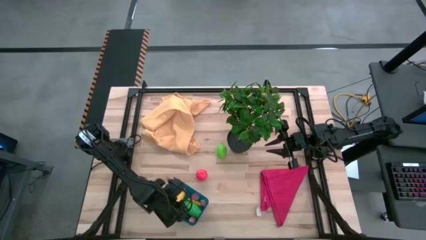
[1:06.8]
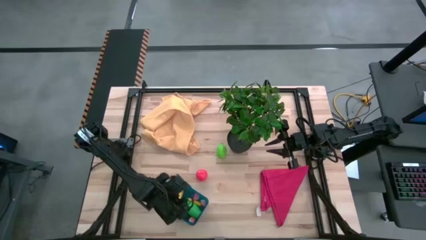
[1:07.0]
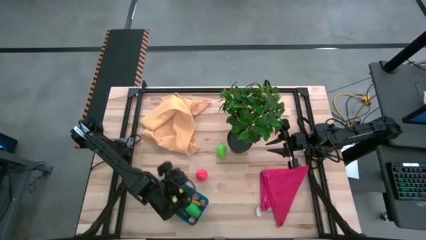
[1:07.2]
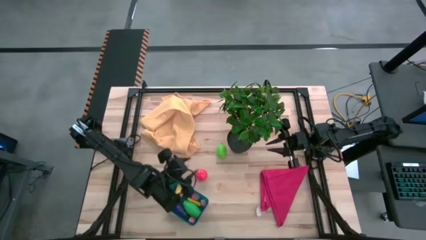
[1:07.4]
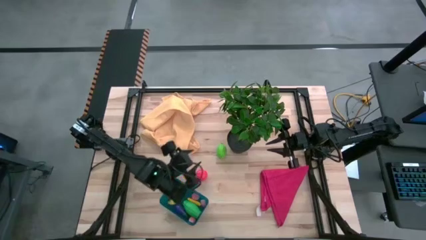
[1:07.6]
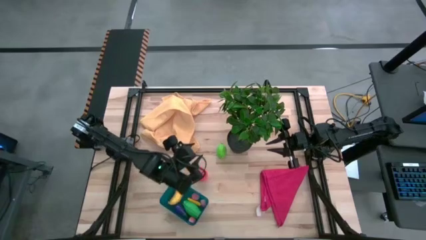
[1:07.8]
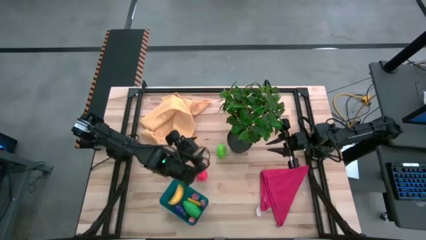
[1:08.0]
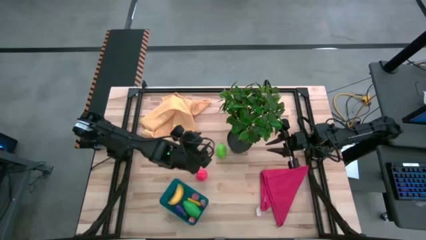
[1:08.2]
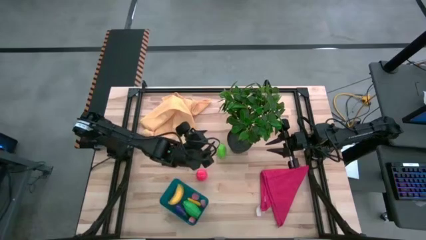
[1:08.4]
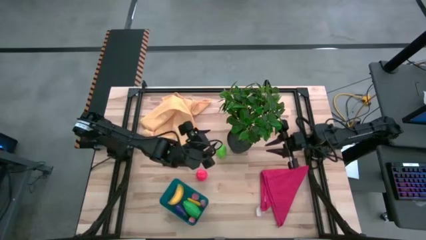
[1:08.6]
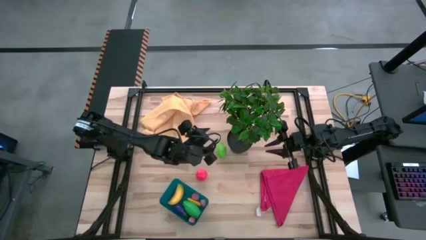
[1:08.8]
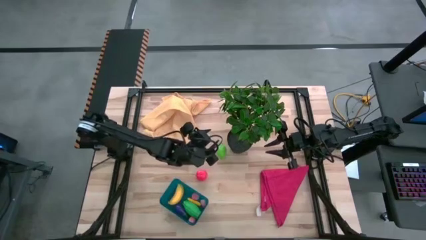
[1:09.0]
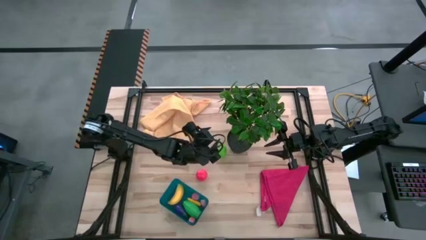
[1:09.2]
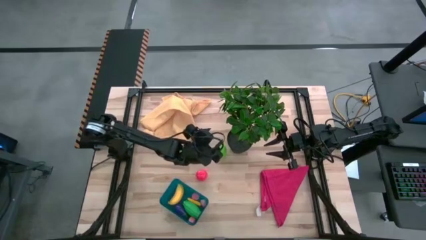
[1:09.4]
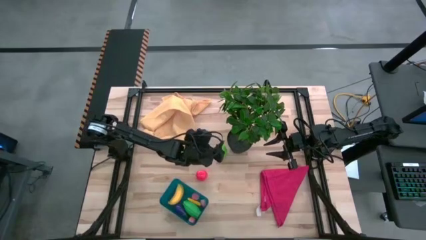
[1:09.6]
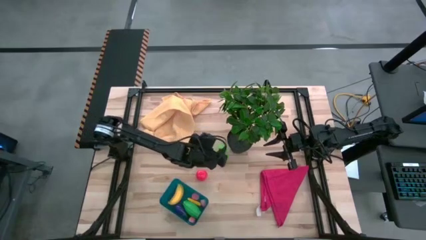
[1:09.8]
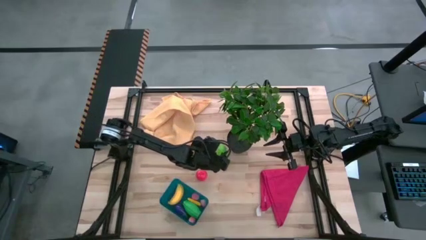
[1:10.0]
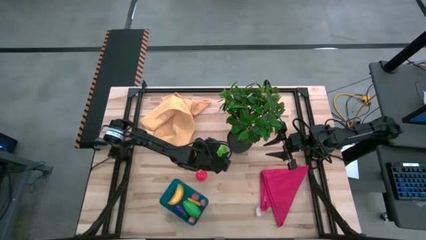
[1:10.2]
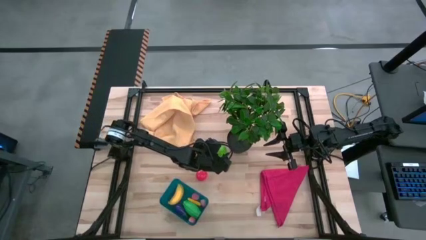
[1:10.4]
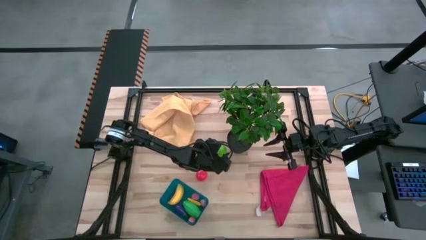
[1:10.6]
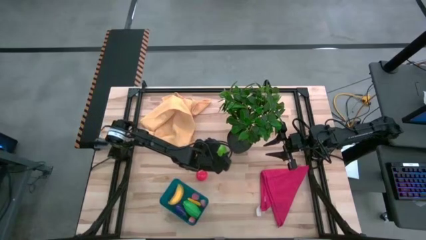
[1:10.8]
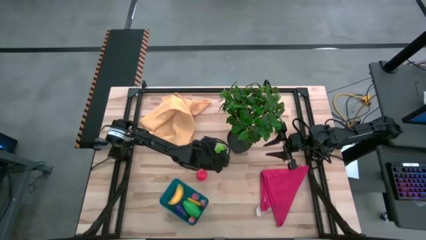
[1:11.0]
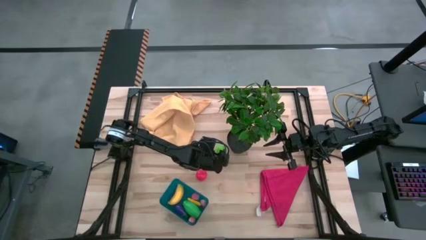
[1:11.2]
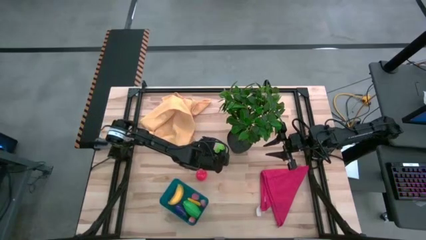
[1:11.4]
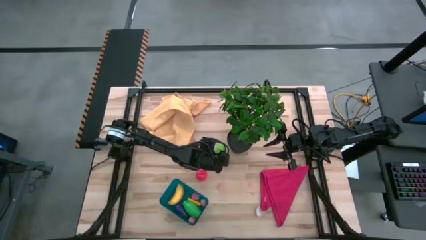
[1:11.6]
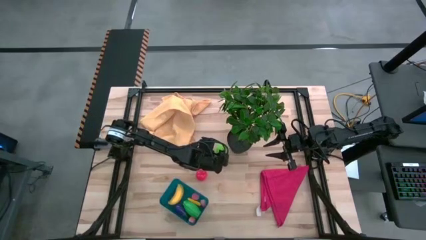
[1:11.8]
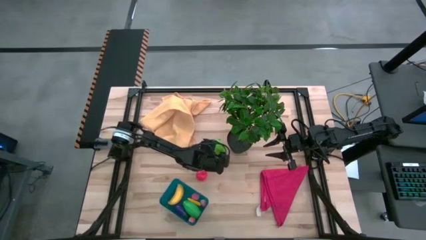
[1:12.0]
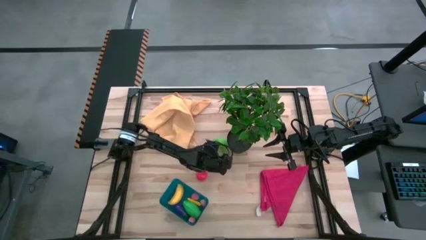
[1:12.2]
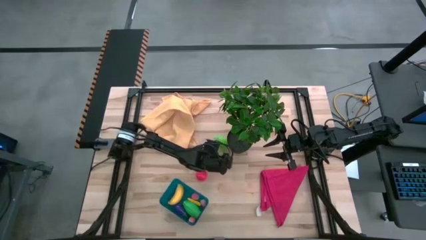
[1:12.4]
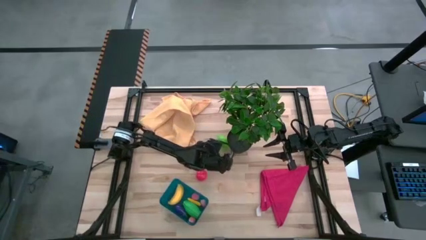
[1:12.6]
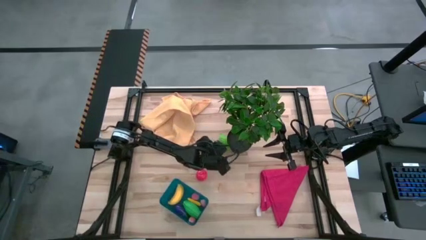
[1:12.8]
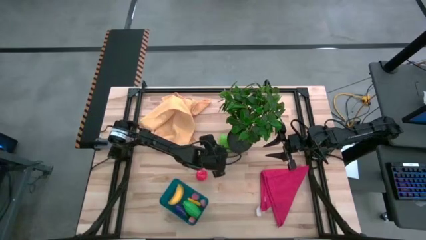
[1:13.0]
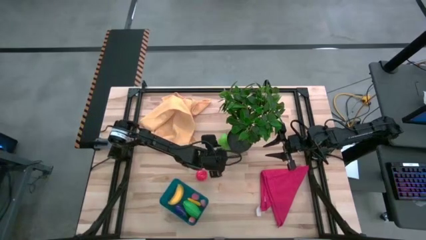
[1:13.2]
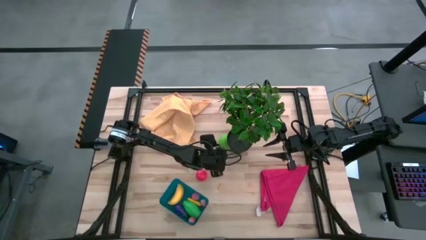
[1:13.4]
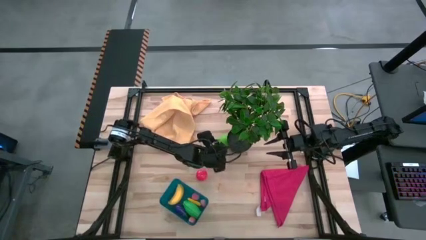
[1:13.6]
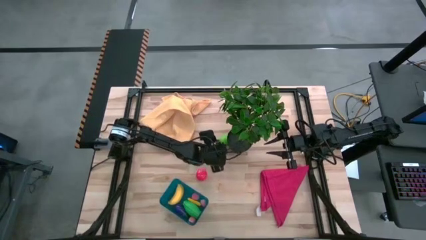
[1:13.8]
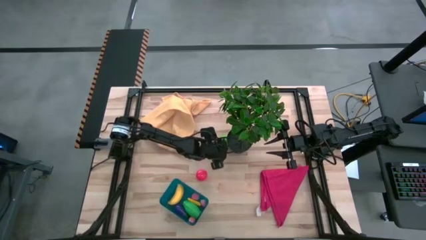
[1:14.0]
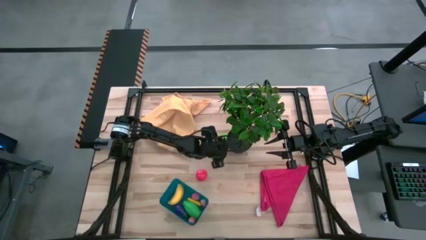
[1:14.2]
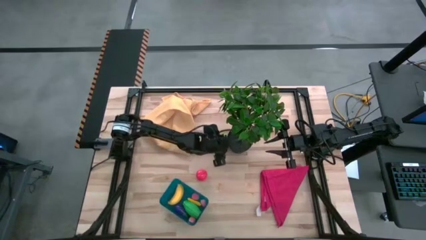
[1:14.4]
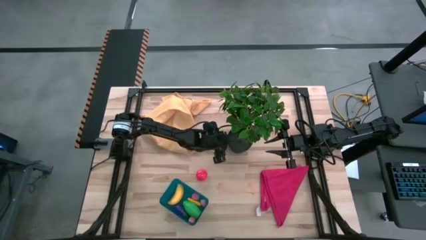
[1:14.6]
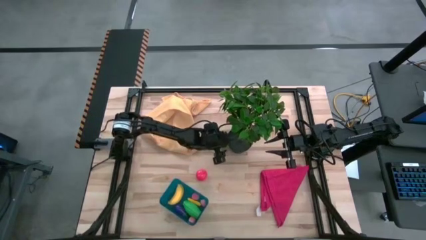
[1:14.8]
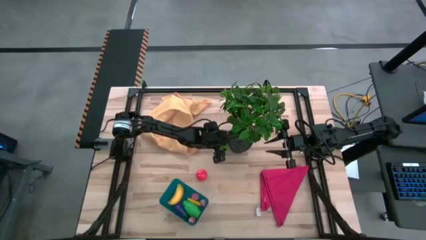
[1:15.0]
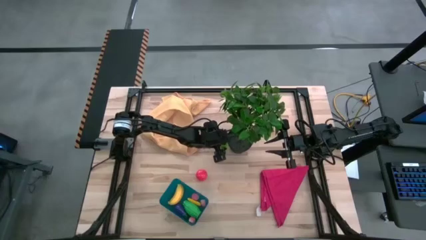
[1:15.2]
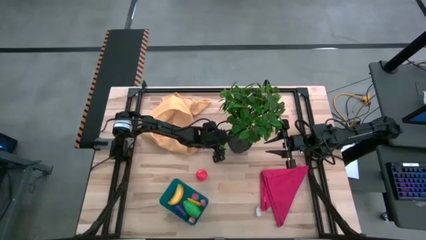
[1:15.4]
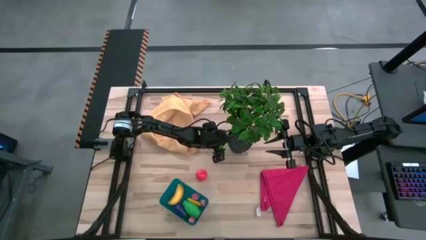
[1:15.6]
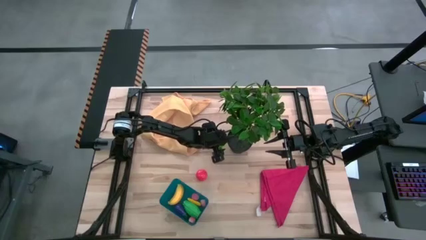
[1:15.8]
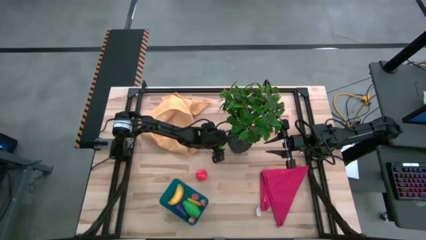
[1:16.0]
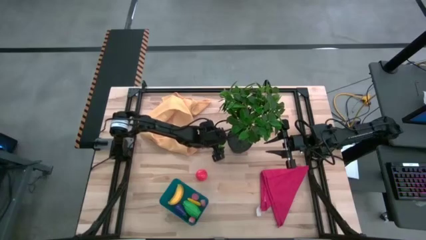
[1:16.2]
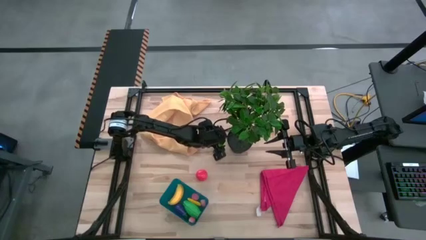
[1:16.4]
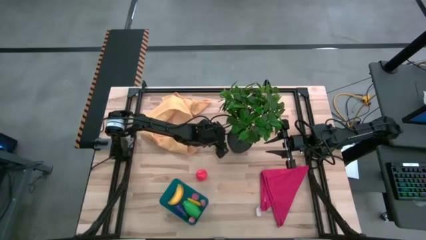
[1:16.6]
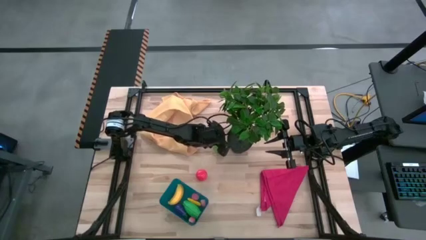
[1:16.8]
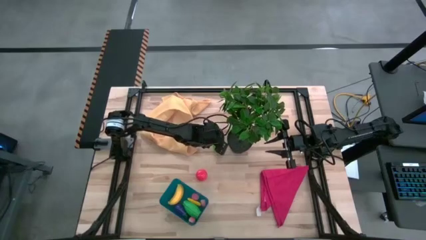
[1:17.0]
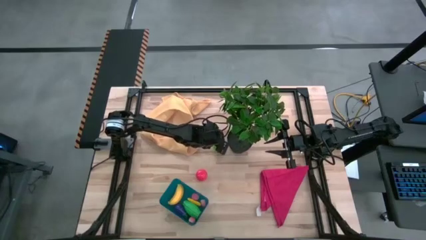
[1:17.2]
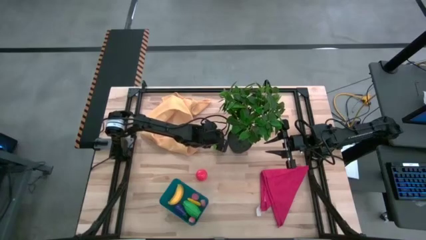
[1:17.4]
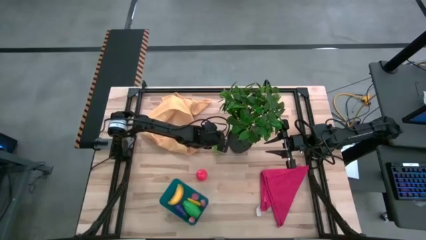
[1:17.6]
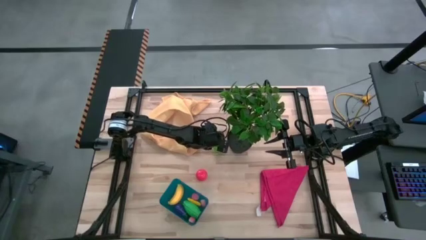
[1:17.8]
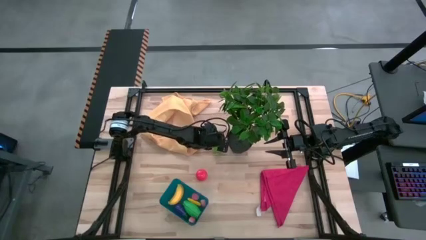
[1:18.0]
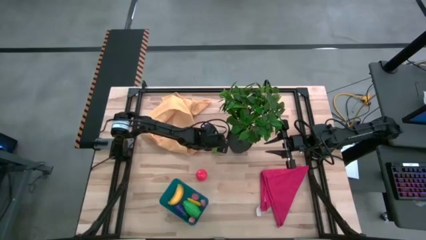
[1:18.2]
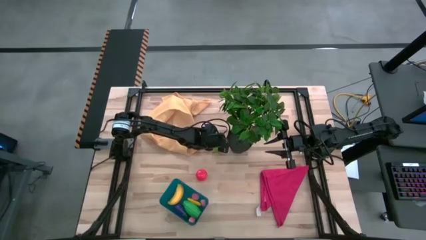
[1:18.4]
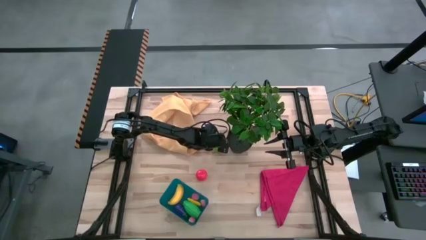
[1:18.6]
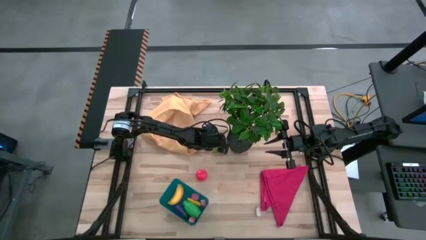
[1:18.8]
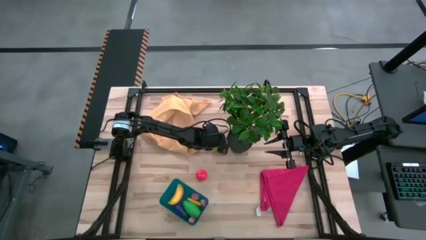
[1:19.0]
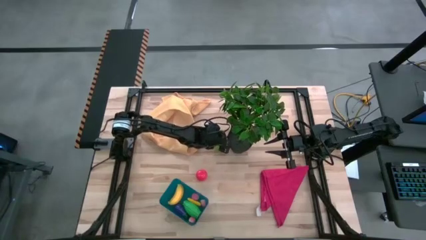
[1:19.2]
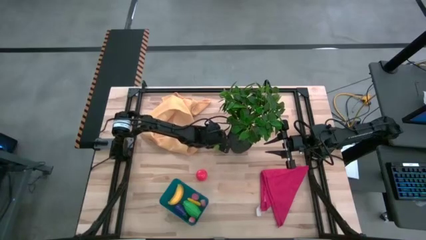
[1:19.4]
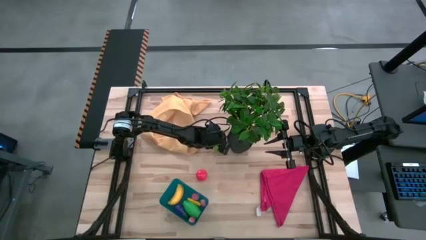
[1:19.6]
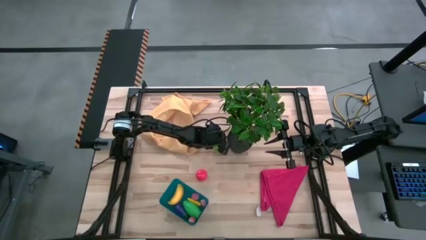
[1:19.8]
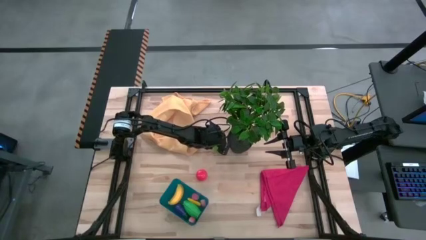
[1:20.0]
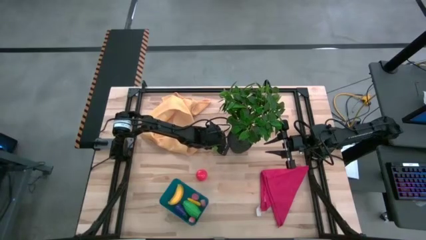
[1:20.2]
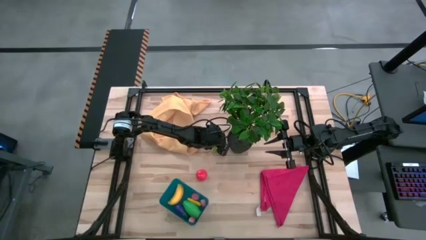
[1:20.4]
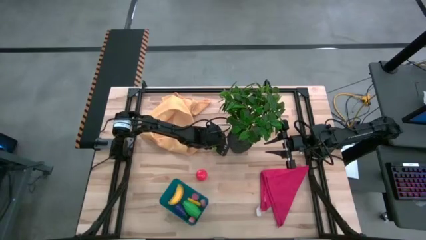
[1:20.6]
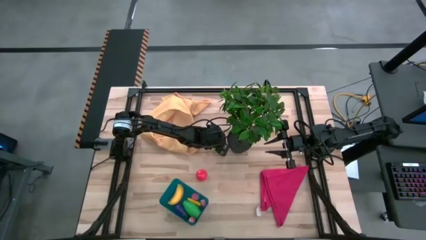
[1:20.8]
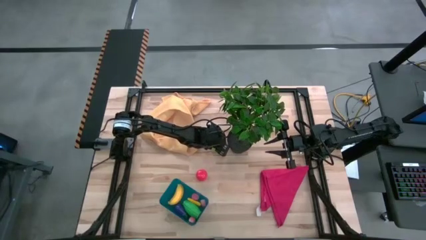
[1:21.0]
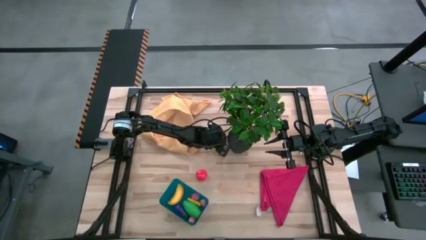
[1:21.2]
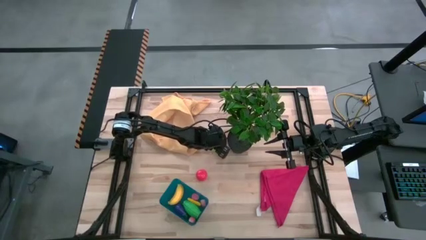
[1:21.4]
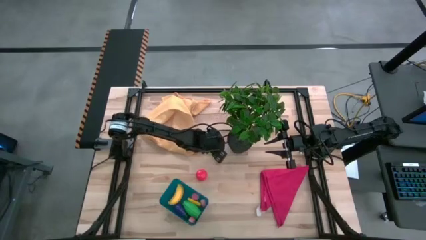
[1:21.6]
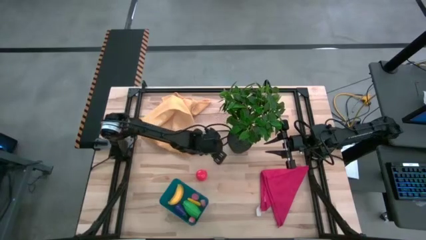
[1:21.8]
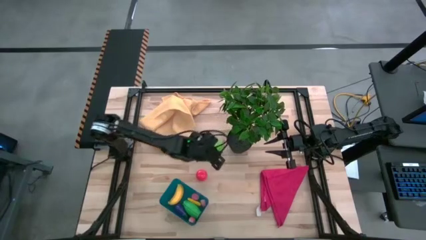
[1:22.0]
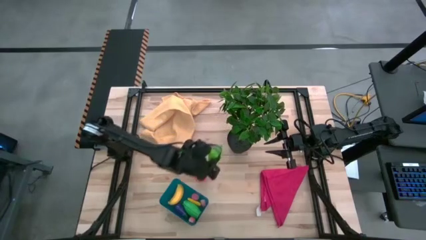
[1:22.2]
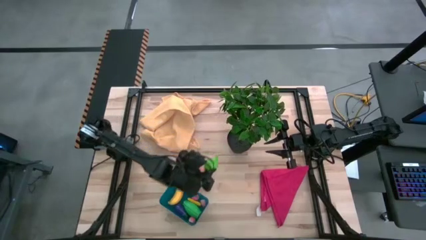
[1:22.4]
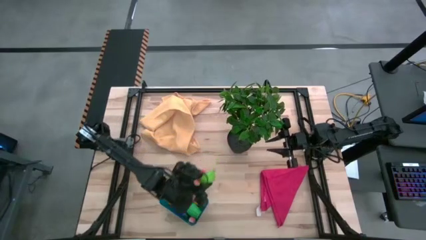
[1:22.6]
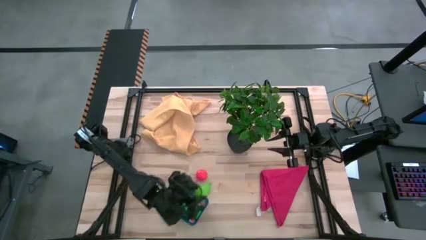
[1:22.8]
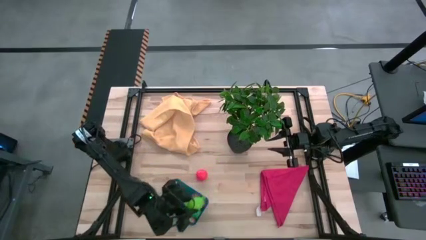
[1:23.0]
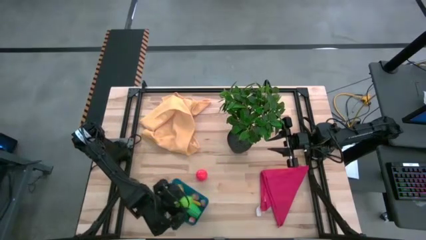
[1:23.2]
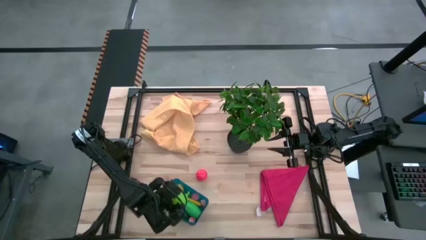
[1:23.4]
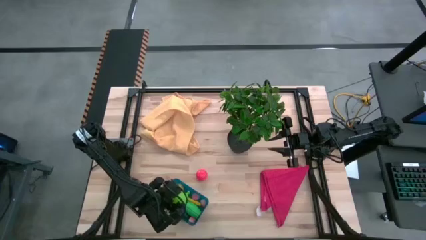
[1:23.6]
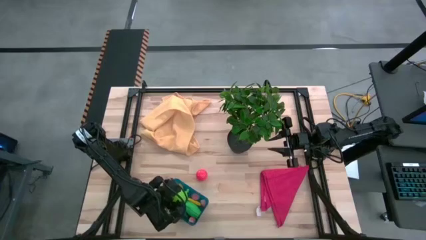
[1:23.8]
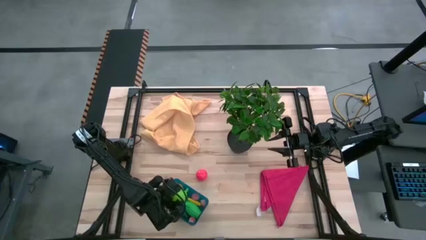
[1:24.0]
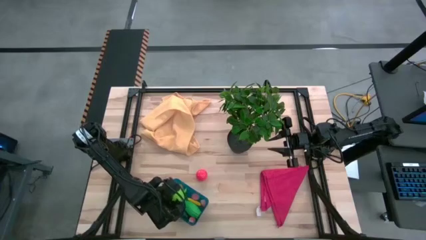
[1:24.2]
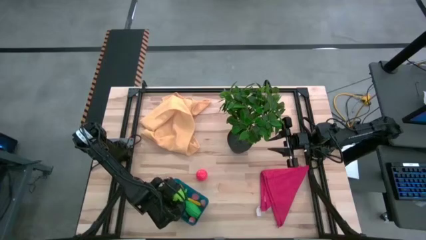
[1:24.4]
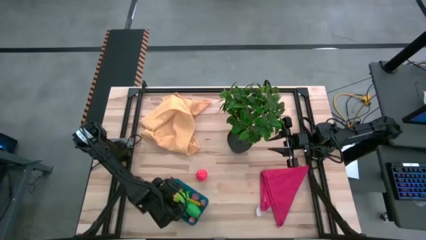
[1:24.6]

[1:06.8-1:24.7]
Task: Pick and placing Produce into tupperware
Put the green melon into the blue bin
